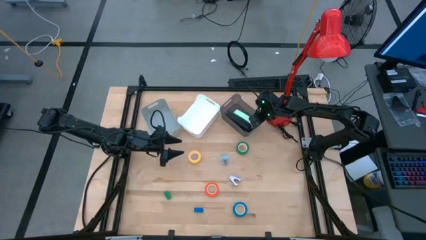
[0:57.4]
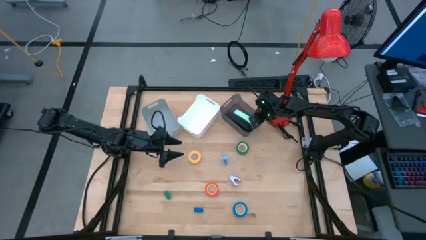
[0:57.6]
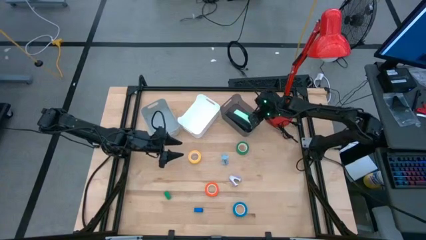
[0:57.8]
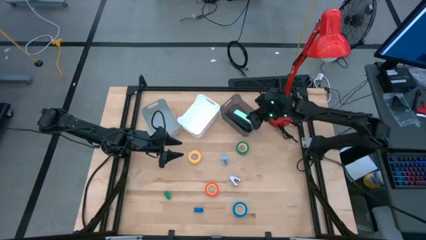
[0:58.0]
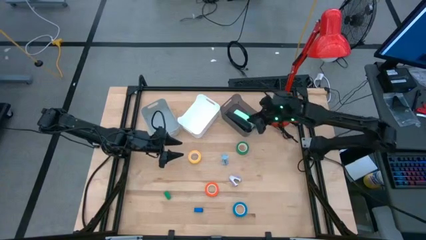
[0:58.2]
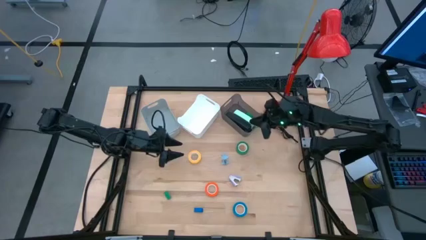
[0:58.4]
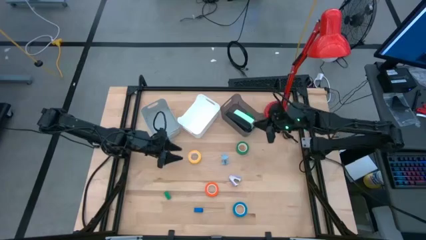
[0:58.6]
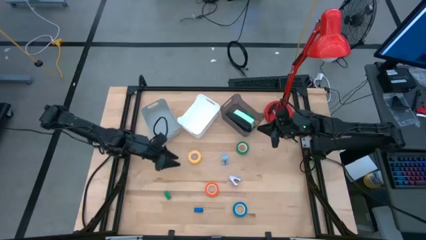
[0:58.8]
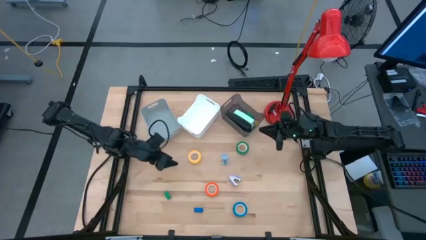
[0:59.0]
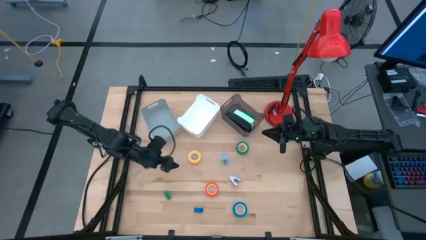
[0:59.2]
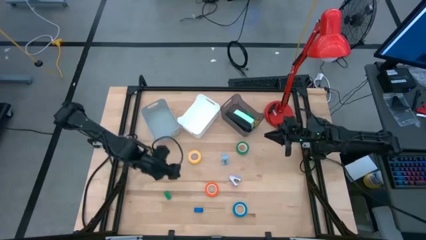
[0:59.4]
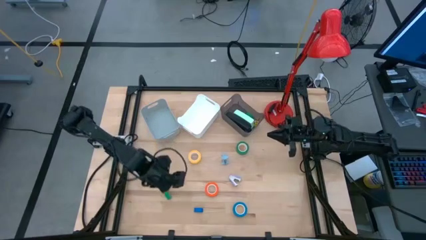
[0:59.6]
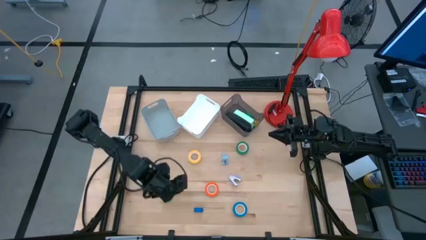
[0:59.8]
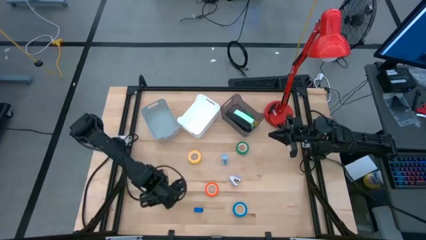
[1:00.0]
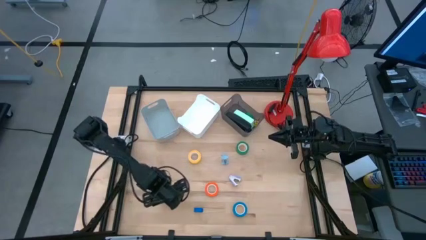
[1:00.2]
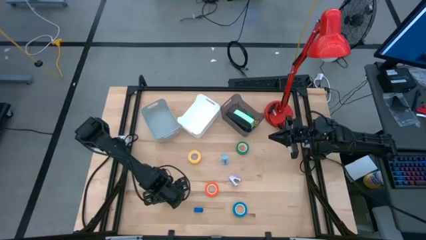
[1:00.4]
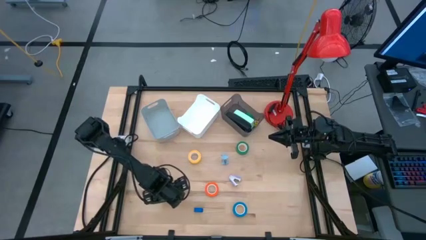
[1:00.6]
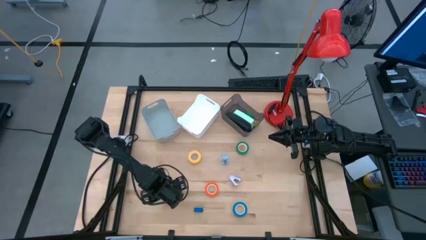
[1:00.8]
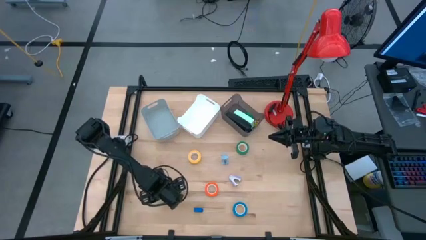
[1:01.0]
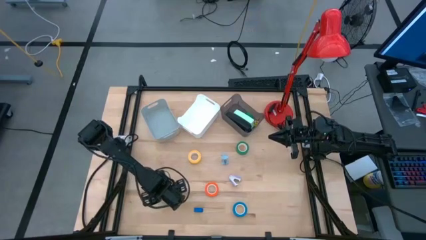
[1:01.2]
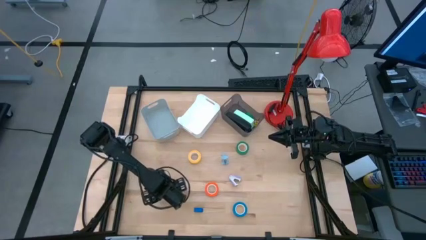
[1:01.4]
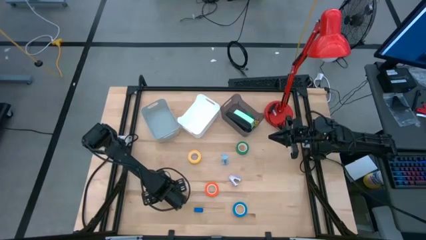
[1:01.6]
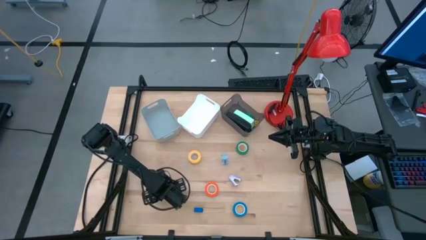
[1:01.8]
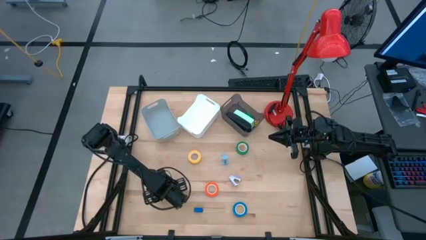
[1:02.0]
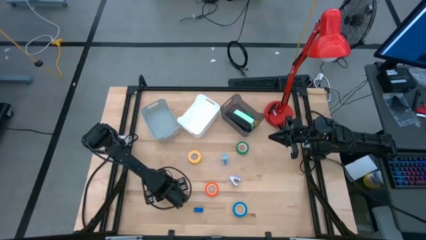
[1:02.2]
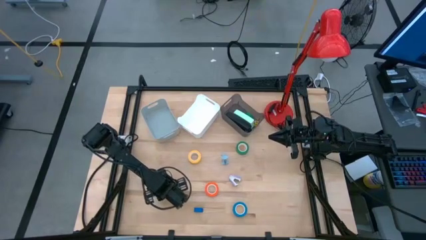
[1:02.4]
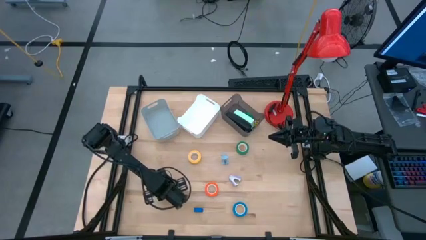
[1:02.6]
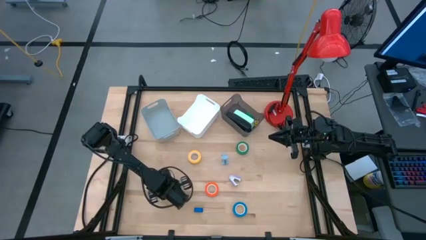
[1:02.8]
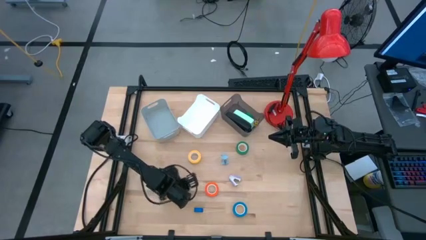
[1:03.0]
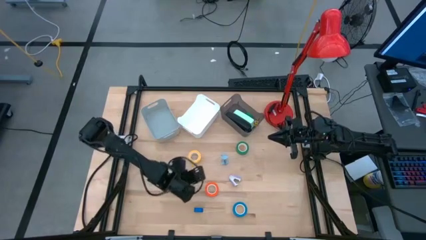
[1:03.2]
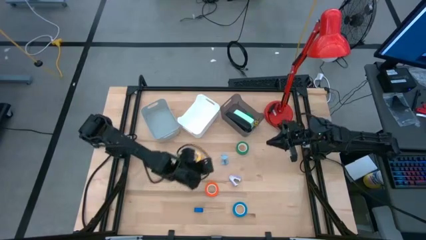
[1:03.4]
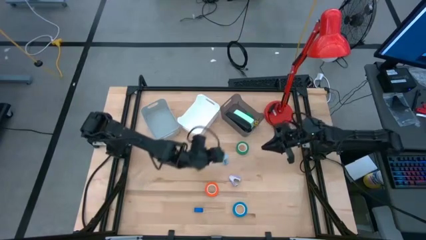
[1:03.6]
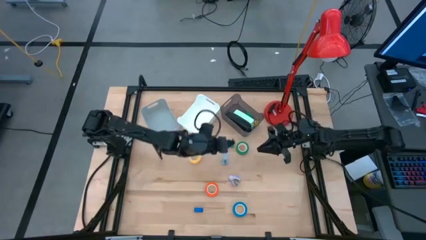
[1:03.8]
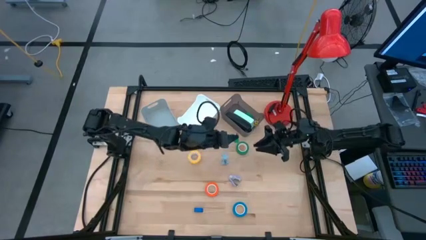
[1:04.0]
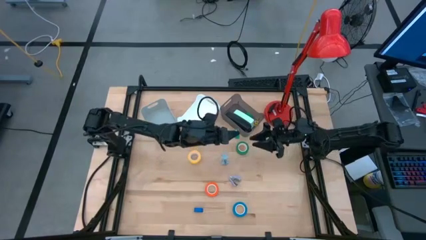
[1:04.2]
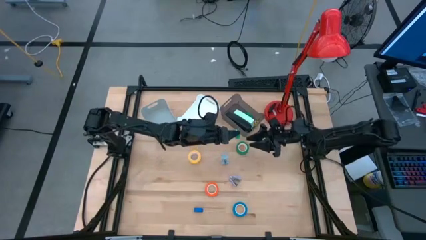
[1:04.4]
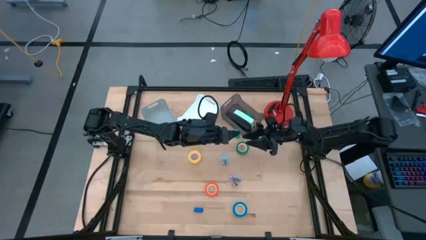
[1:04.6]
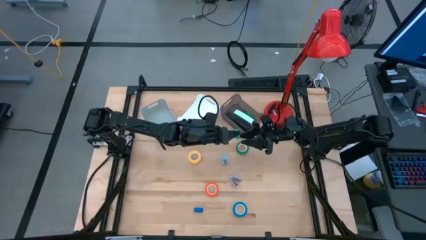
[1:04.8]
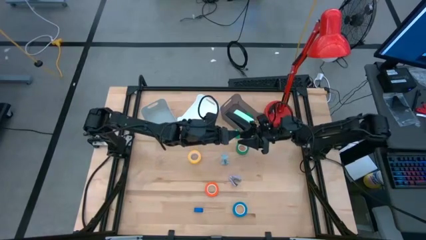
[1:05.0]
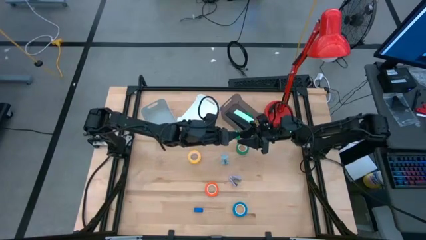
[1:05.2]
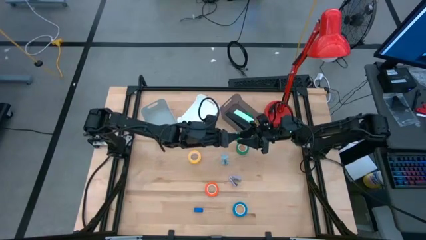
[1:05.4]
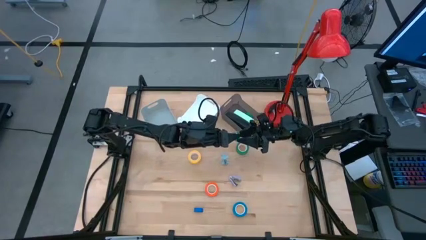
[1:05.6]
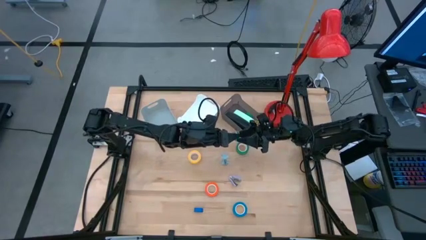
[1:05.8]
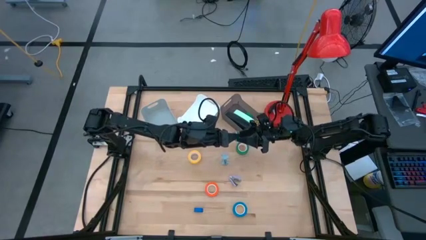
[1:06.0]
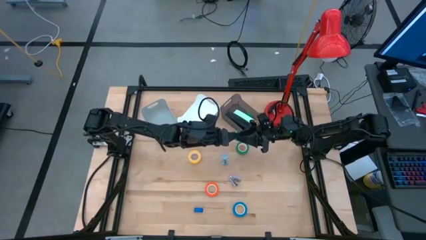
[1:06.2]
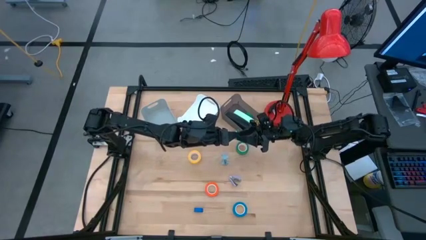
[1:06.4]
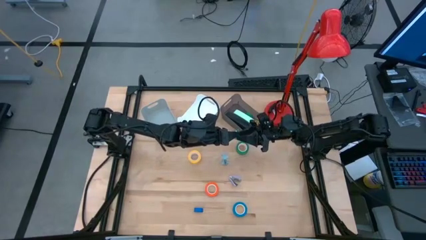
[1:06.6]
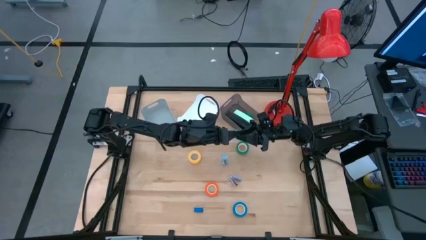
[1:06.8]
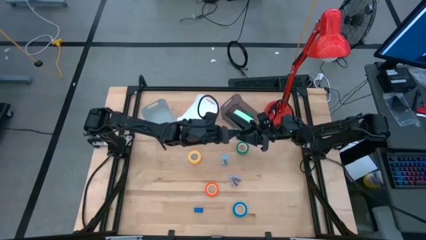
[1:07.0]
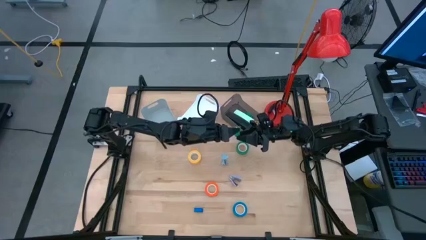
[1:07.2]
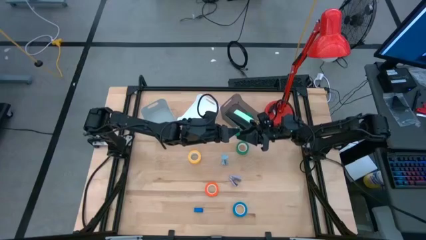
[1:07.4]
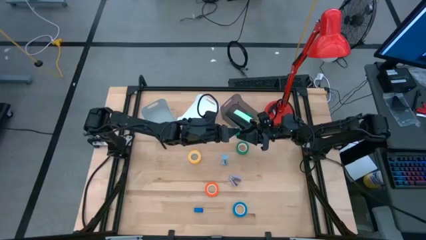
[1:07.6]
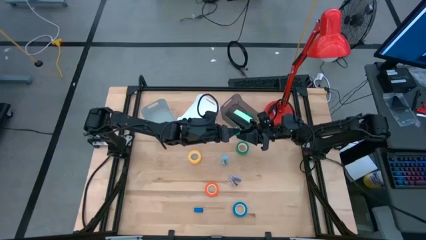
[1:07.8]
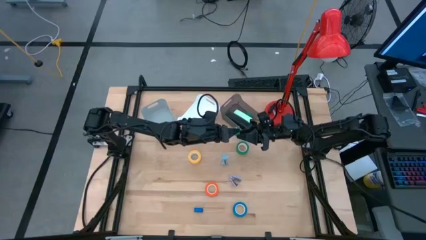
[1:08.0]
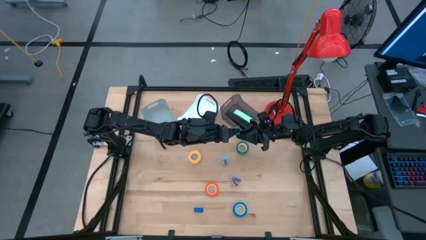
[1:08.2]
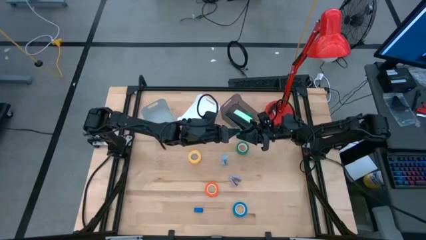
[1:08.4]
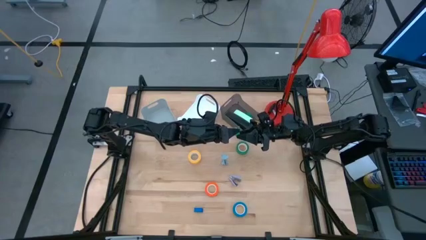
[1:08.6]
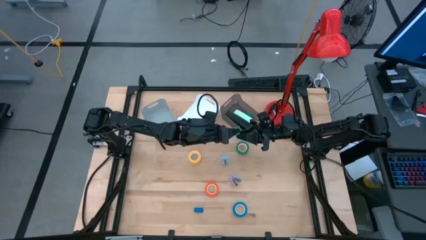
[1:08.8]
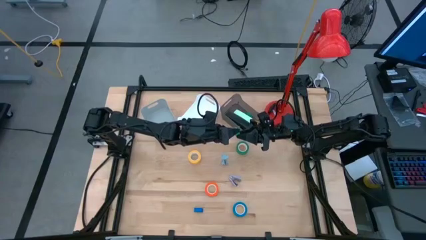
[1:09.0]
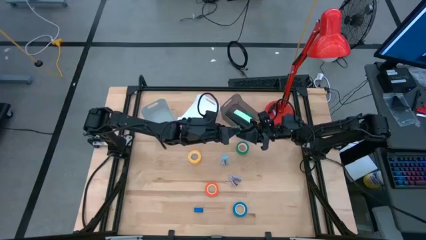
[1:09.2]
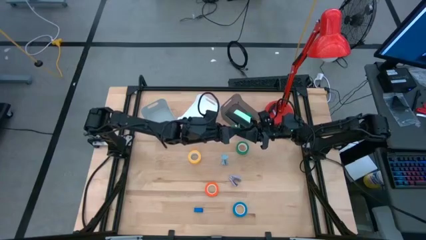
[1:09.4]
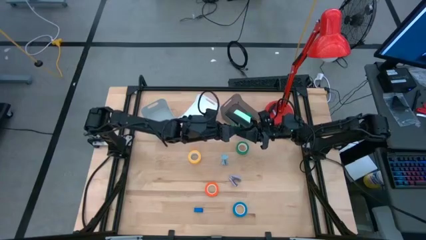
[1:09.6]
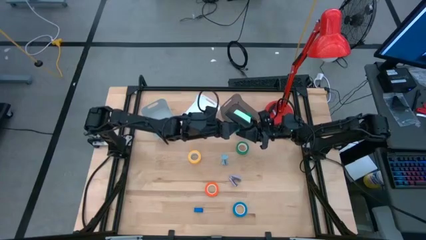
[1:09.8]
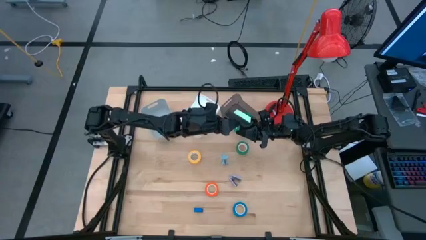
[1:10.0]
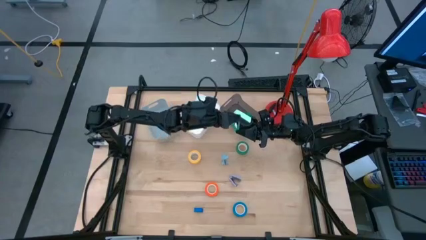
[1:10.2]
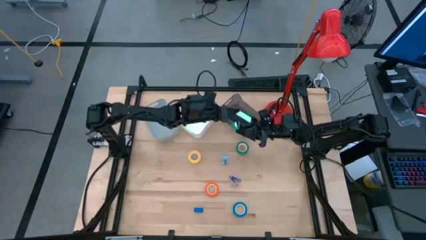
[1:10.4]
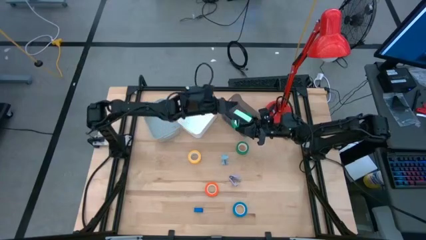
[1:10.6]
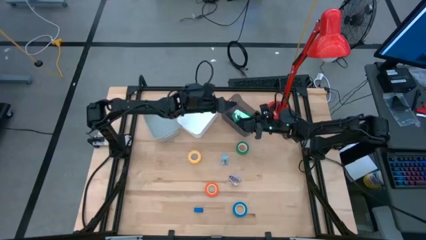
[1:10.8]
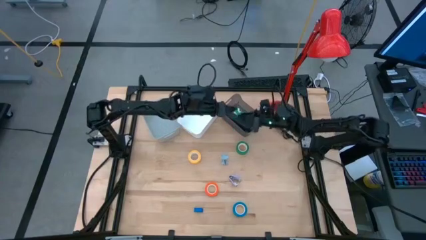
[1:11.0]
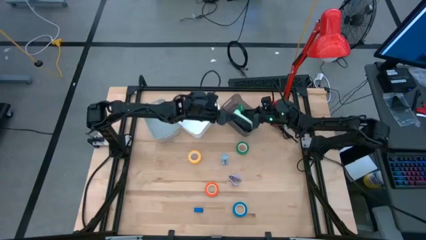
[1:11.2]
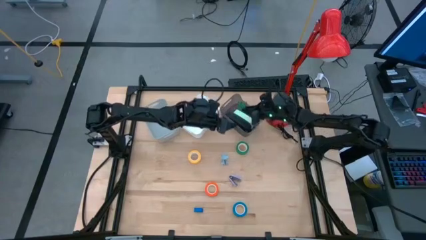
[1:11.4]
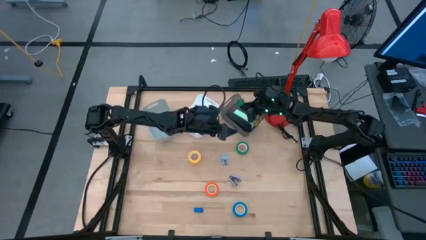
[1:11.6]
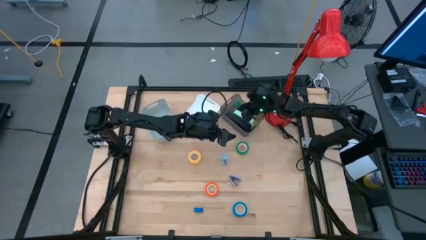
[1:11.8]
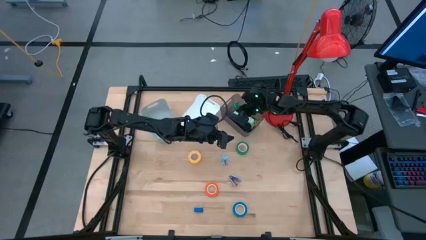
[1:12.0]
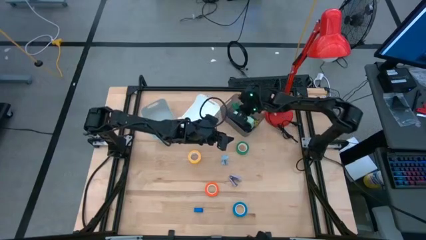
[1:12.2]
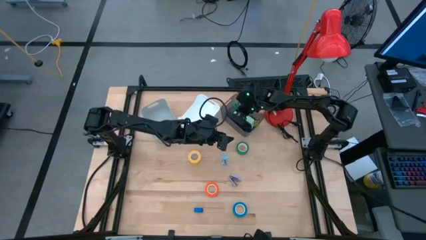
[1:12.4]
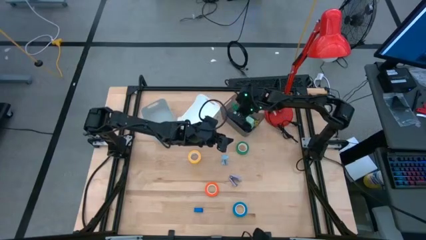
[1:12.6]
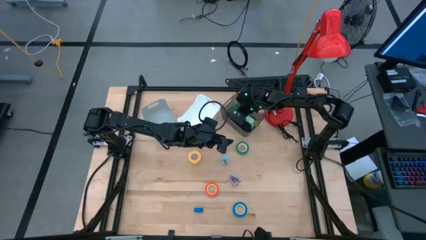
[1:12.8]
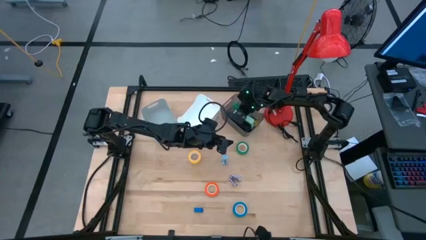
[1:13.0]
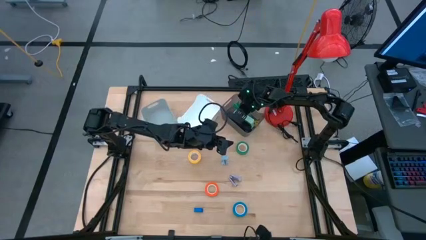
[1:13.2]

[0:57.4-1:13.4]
Task: Pick and place Stapler, Stapler remover, tape
Put the small green stapler into the black bin
